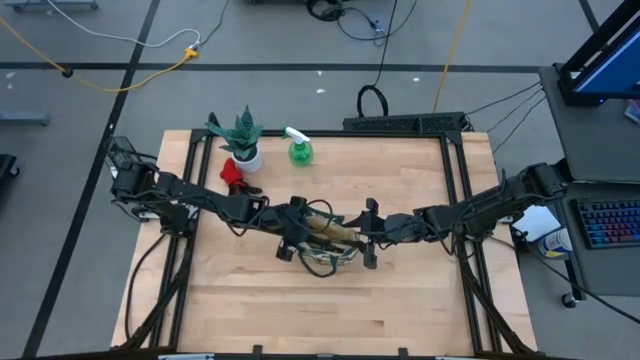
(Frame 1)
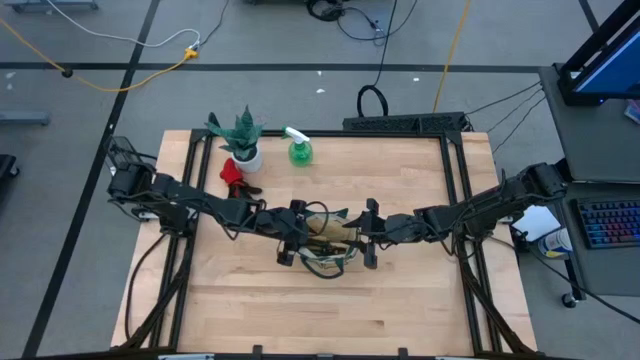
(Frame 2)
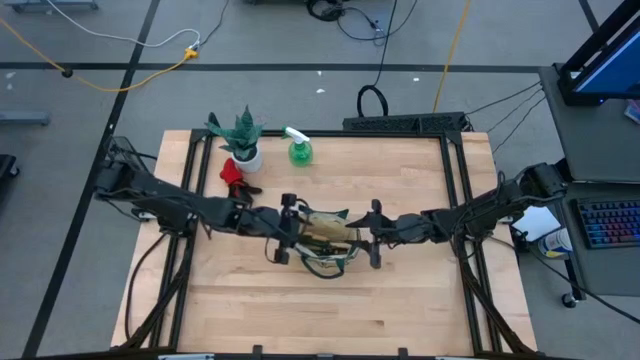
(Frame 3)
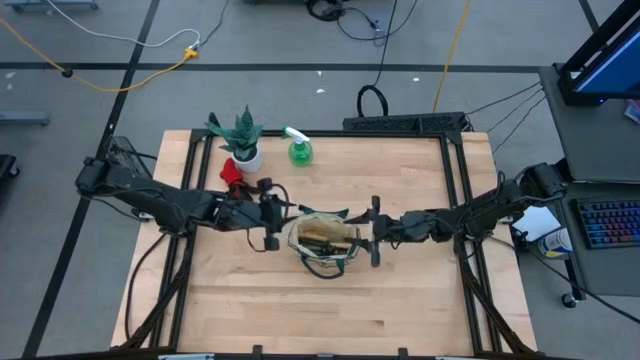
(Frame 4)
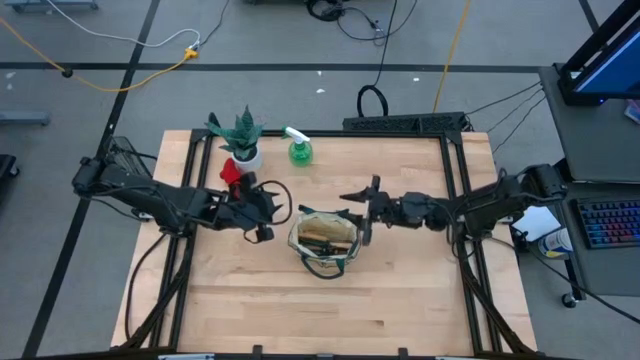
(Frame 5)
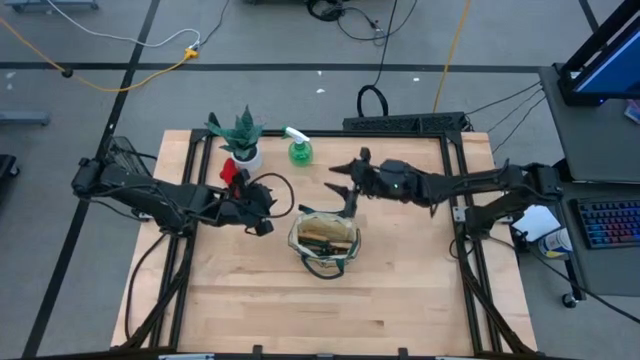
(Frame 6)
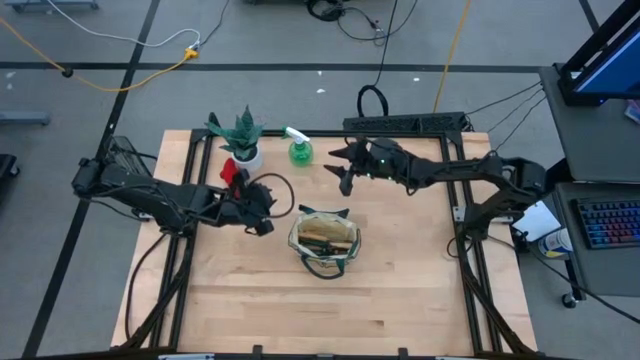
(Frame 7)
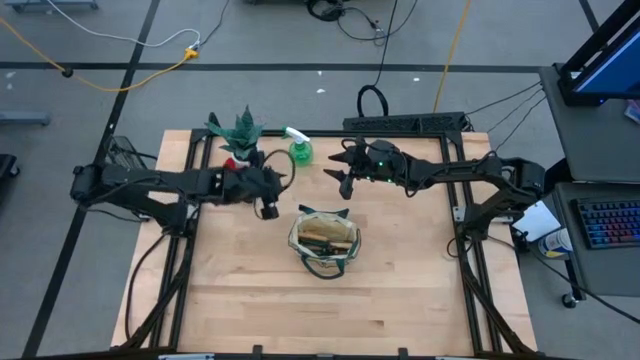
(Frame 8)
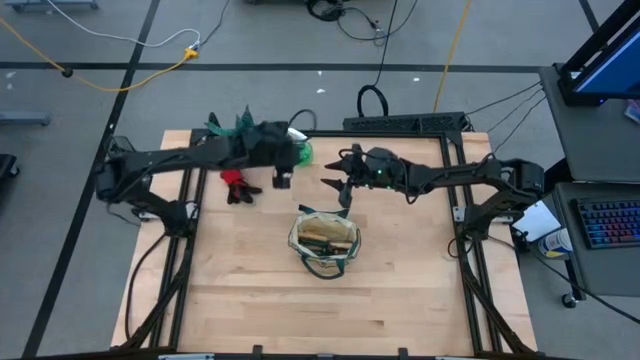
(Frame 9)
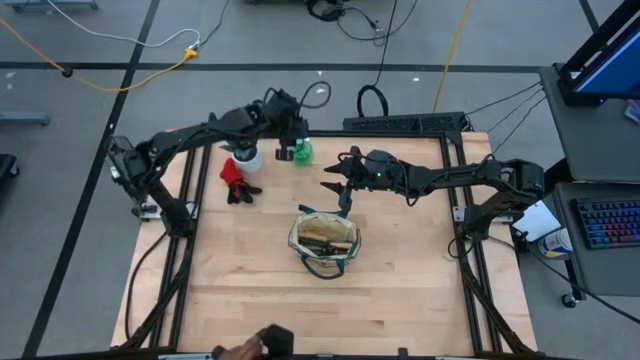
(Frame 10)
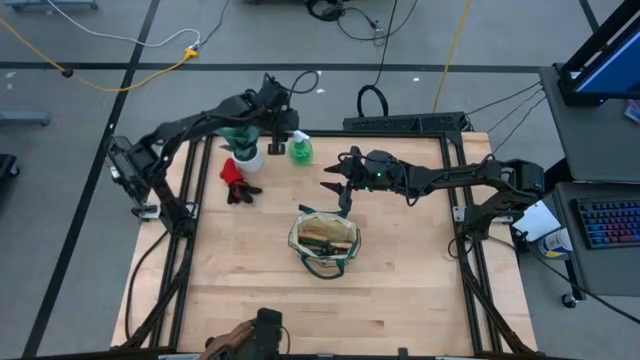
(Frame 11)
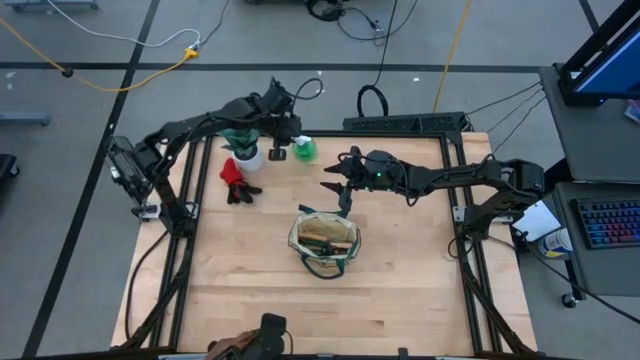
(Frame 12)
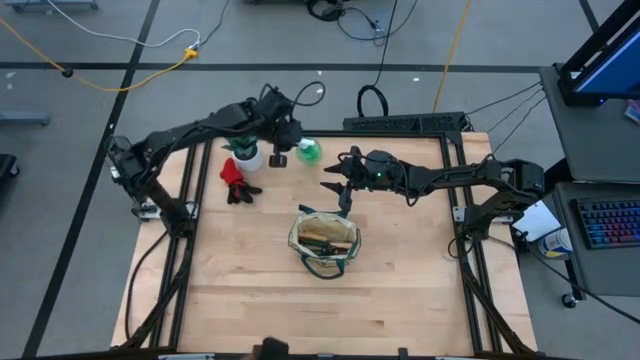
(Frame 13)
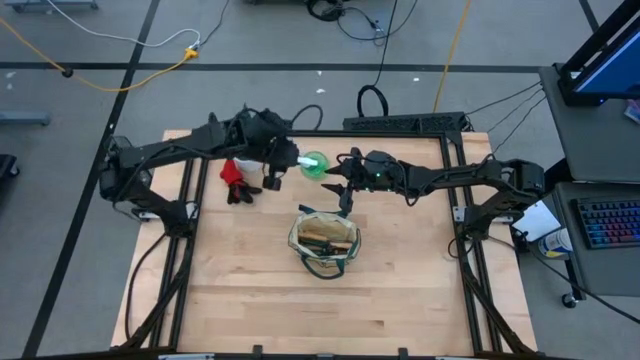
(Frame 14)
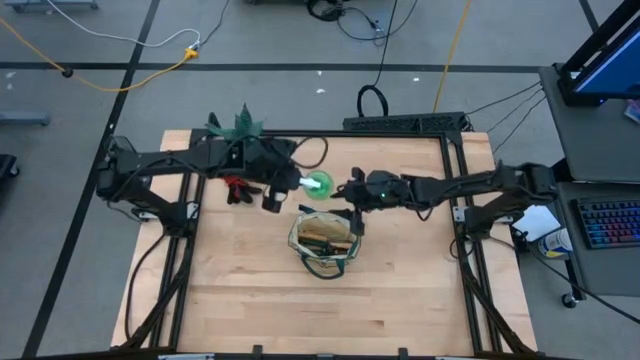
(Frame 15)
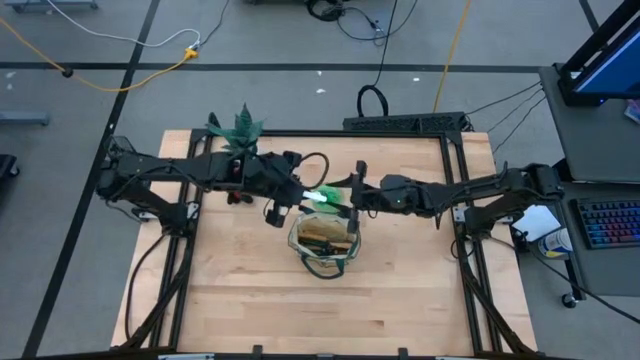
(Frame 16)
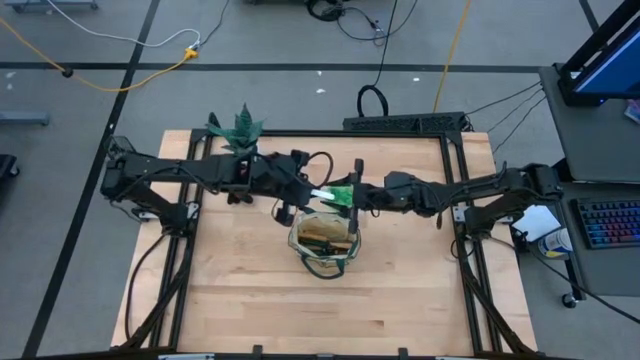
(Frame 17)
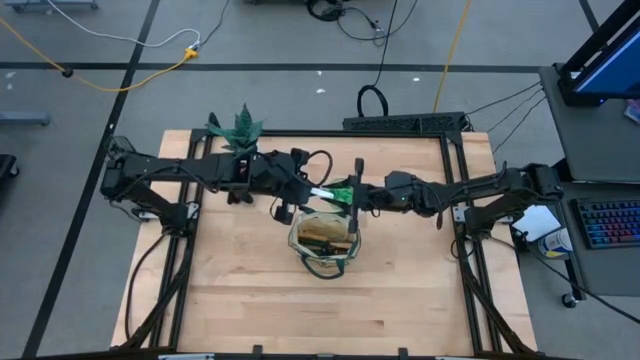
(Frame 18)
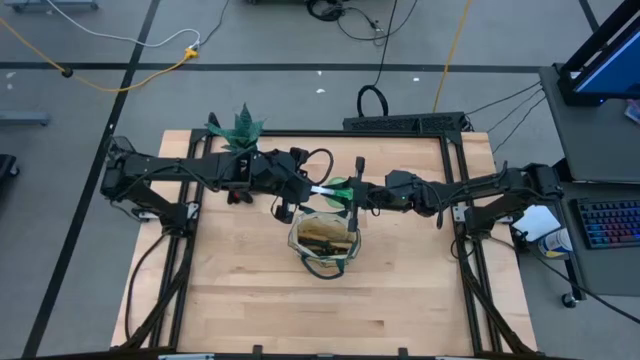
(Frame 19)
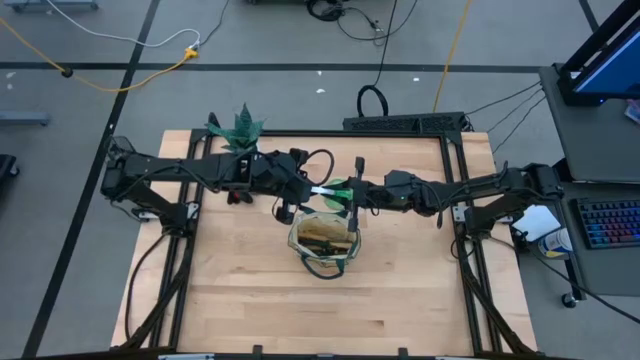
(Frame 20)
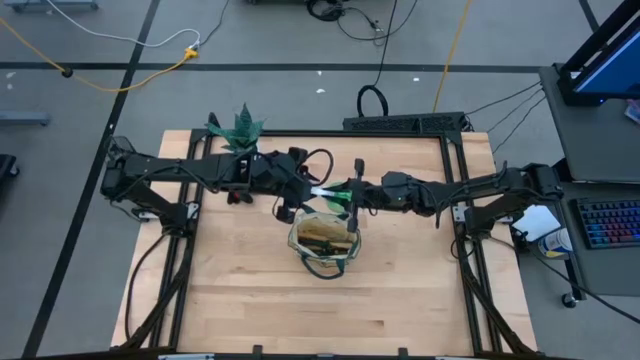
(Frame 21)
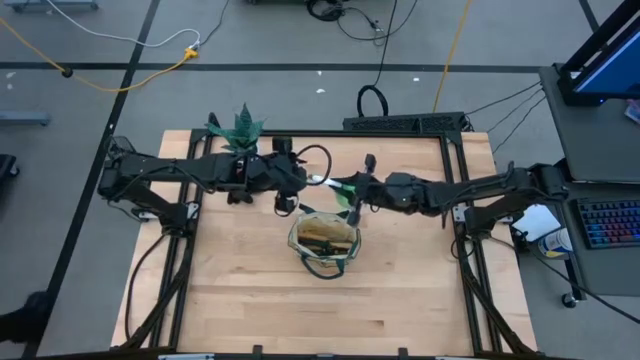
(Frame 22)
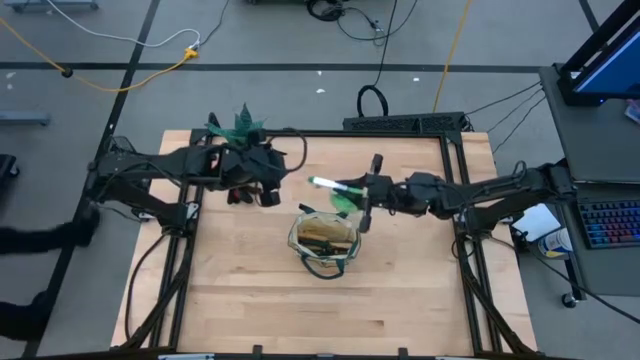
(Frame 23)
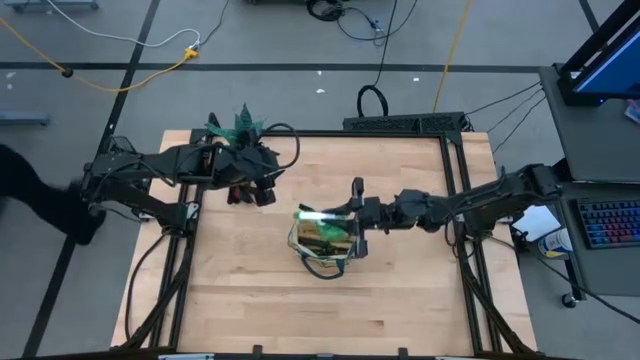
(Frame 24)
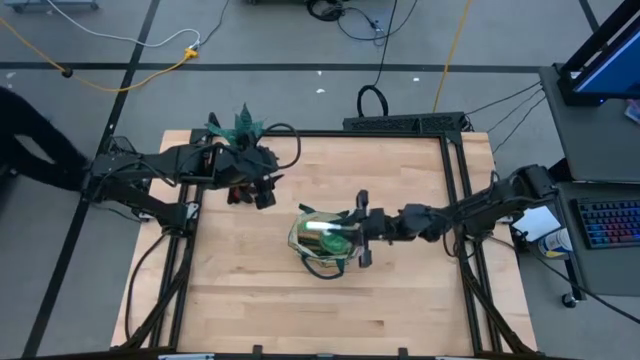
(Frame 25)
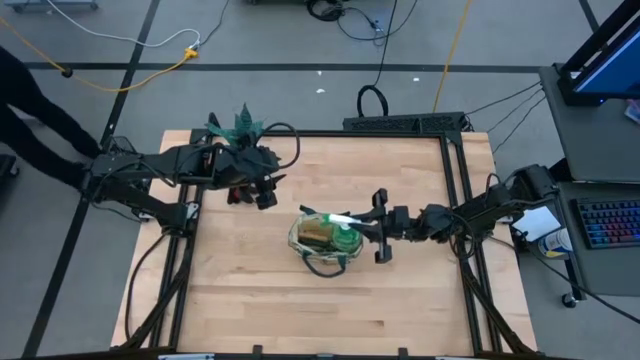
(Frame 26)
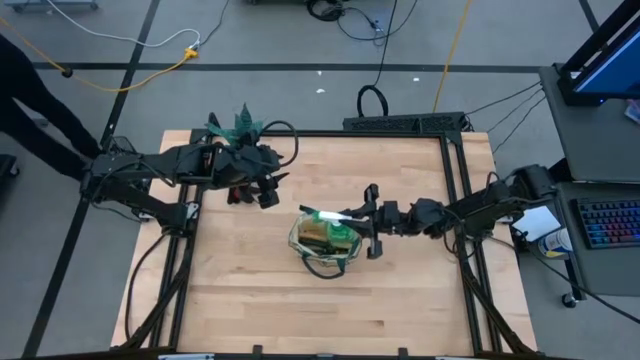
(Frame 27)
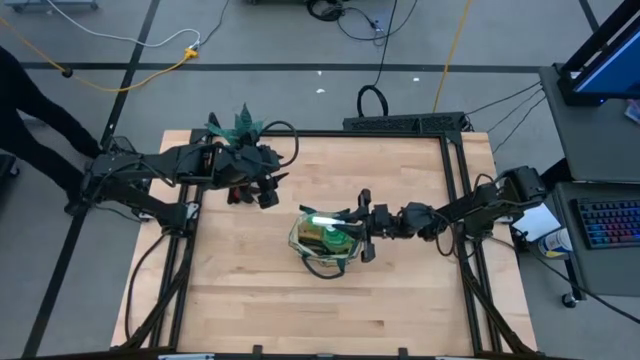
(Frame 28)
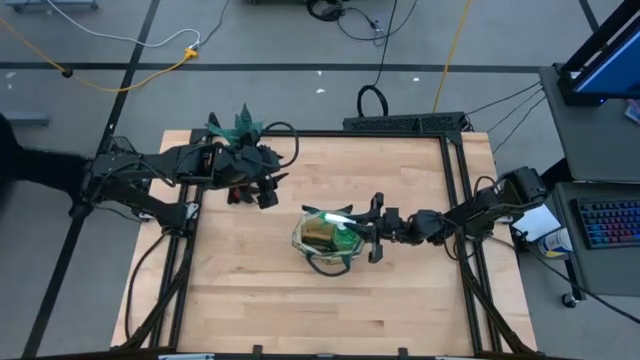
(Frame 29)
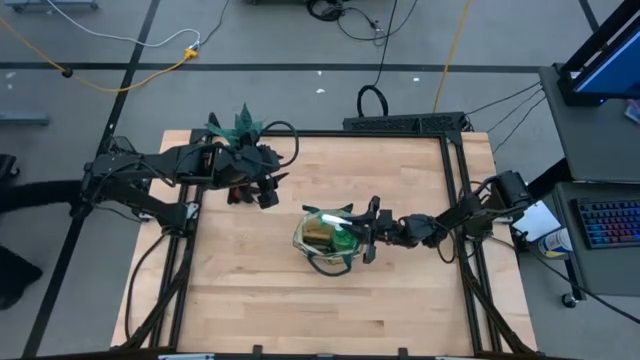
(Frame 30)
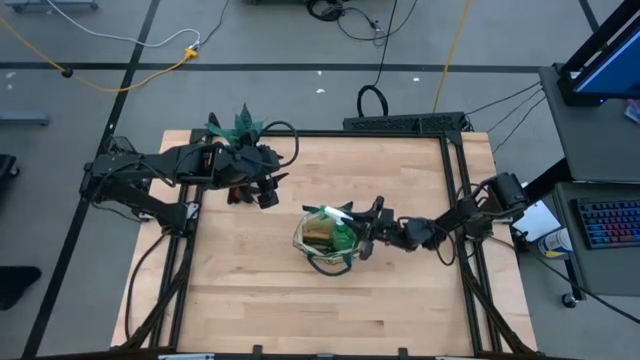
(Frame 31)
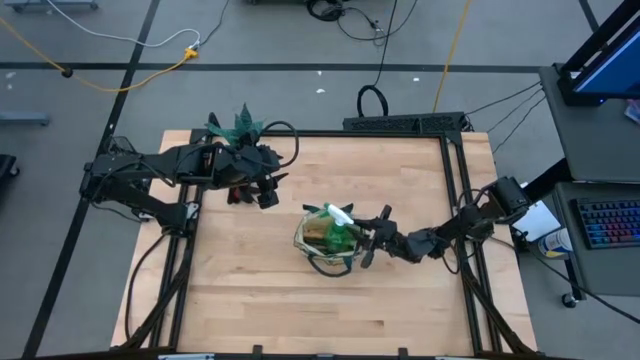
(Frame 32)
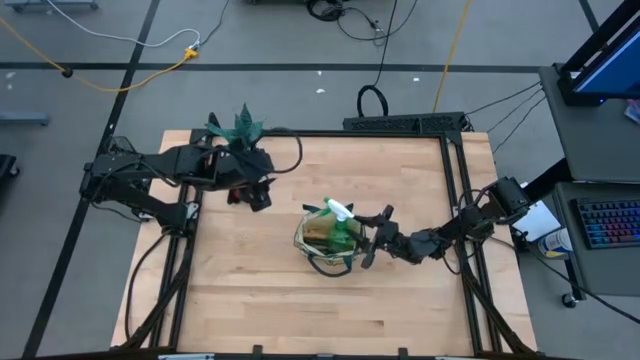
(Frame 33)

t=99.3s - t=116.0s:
Task: Pick & Place Garden tools in Gardening bag
Put the green spray bottle into the gardening bag

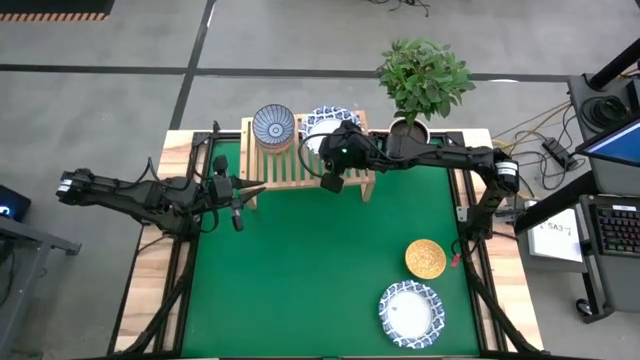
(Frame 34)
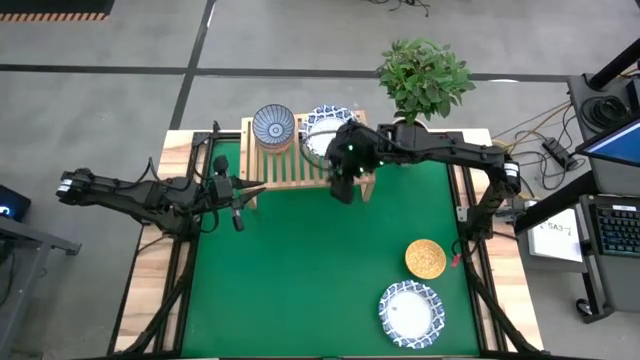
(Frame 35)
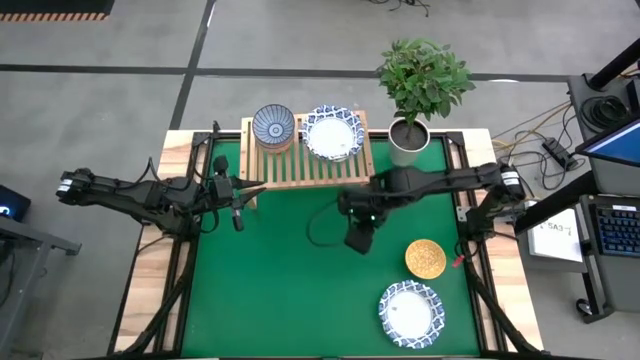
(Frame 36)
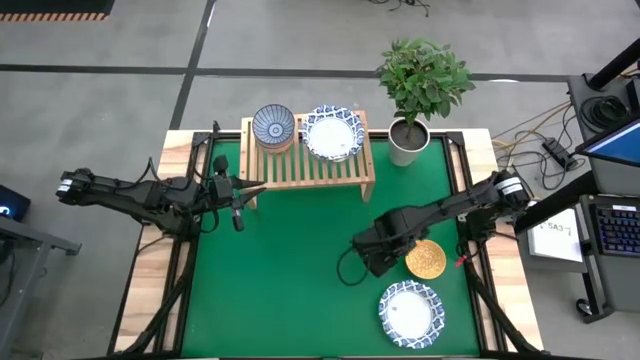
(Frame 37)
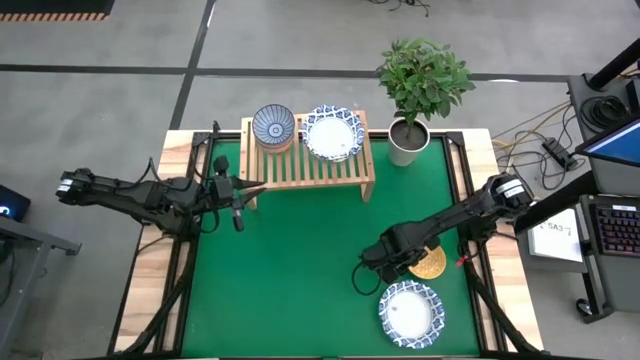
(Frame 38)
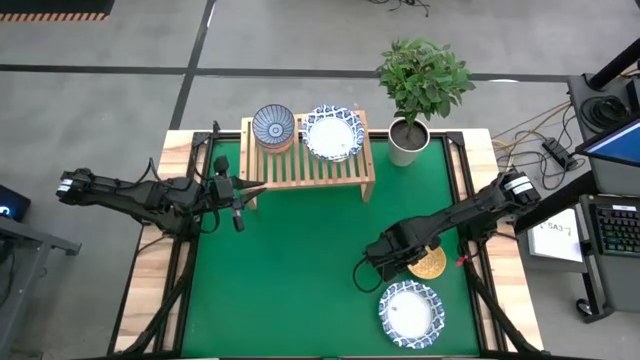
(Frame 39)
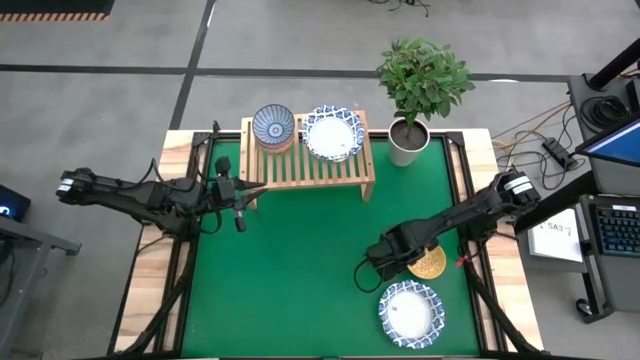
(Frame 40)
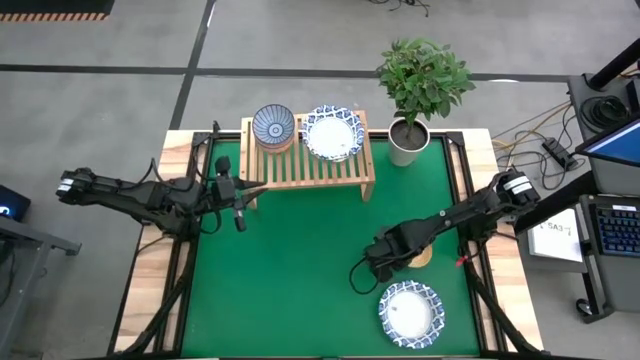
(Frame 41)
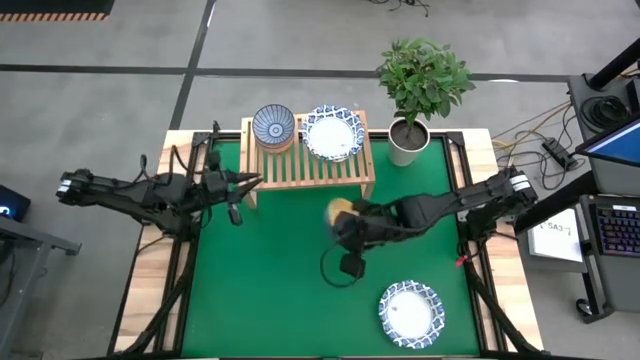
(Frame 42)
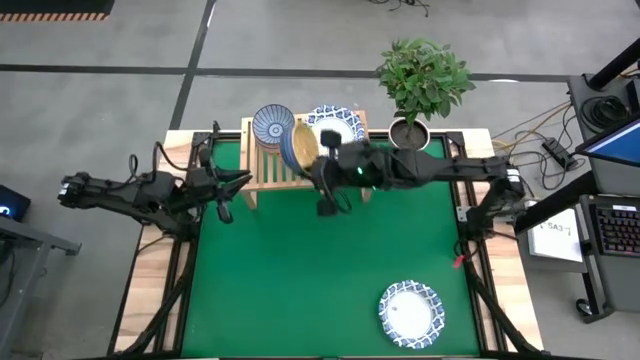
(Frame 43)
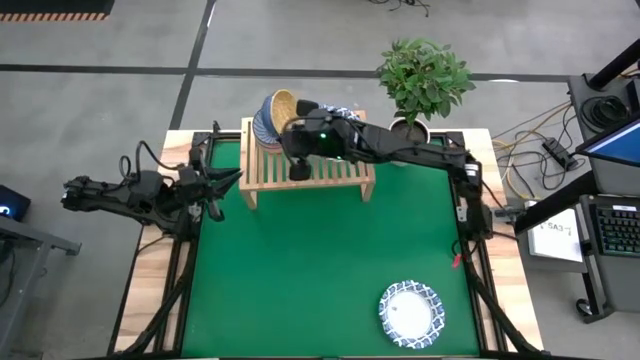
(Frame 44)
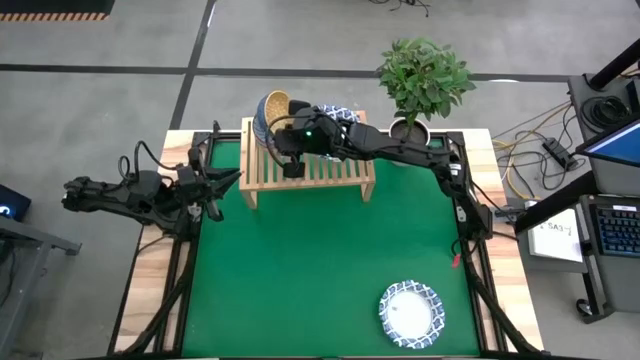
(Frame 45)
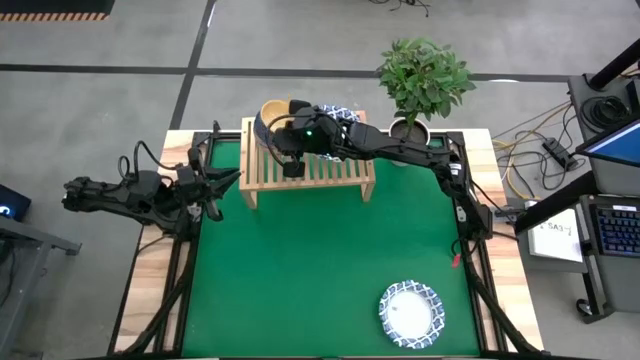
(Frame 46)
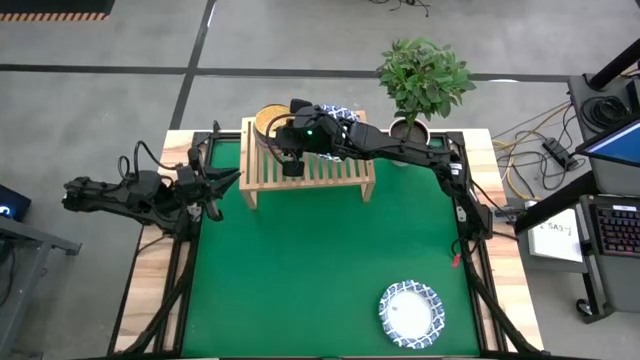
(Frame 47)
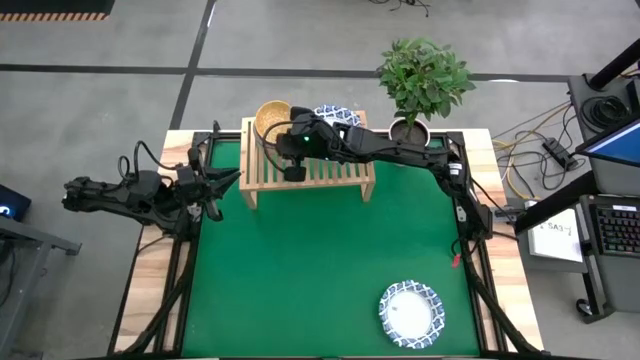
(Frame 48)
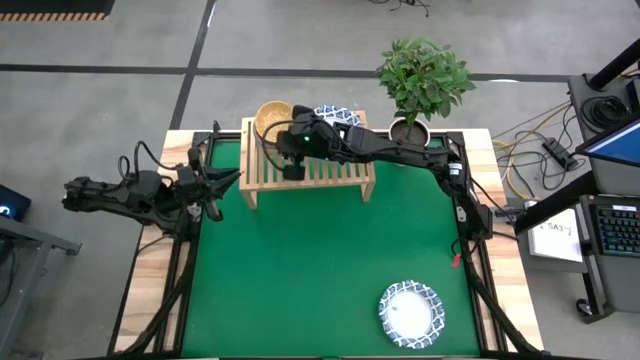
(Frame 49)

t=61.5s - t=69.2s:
Task: Place and stack bowls onto a shelf
Stack the yellow bowl on top of the dark blue bowl on the shelf
